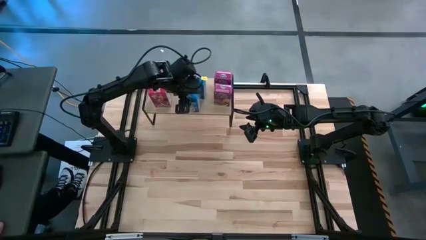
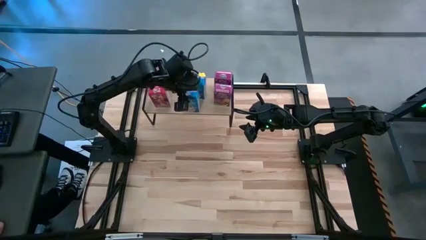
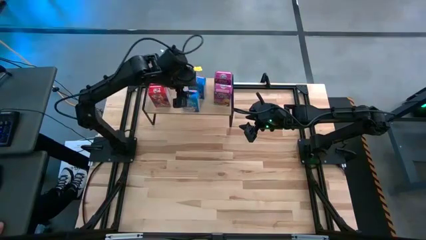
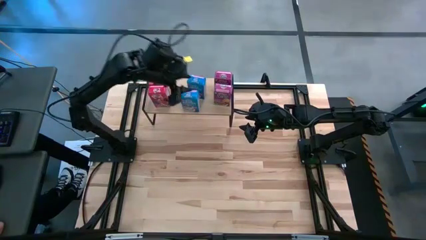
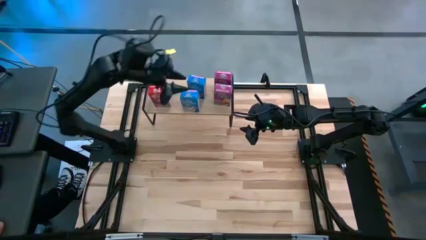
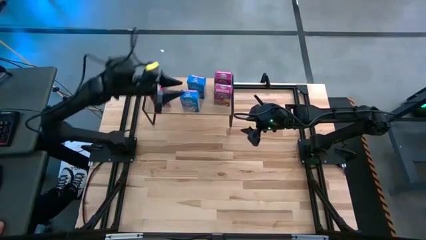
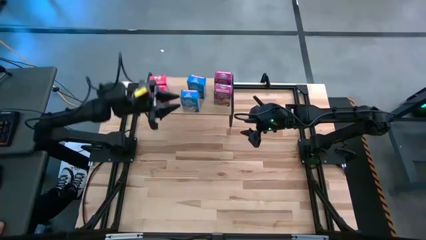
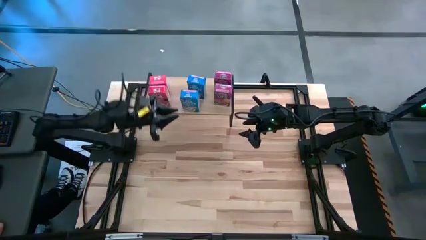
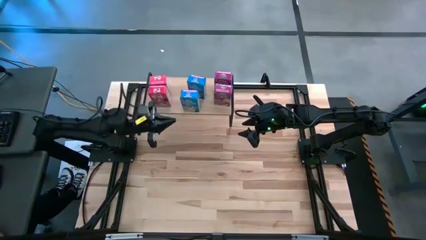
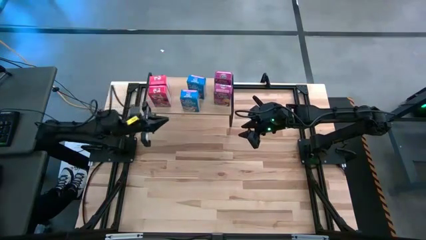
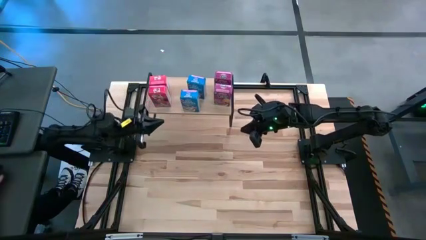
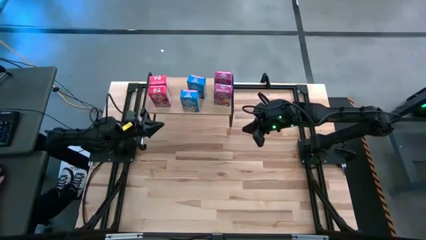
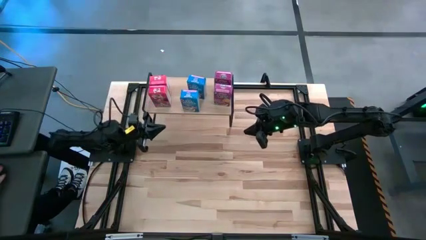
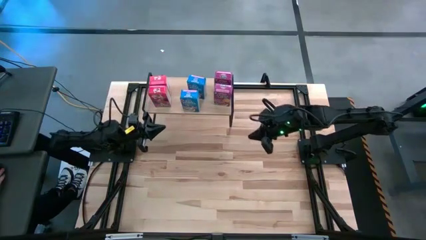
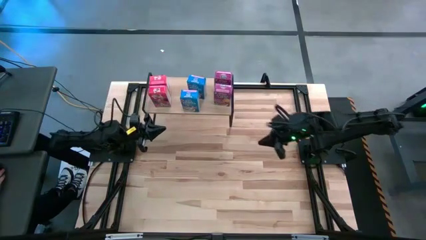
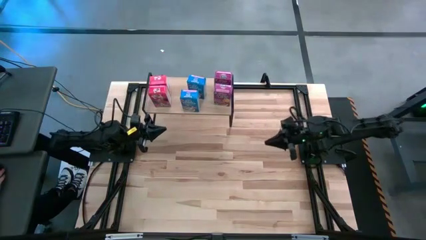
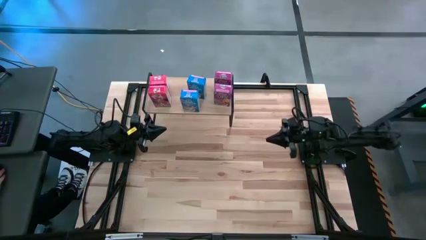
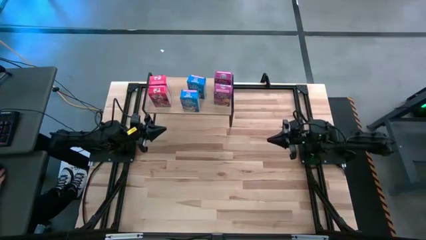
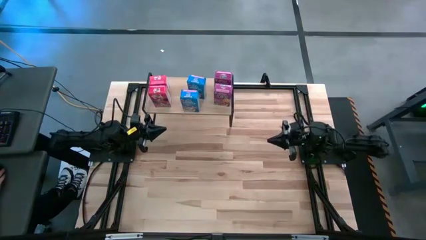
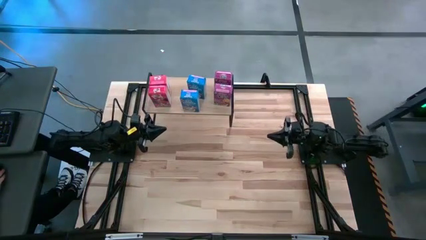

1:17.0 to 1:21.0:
Task: Stack cereal on shelf
Return to Home Position

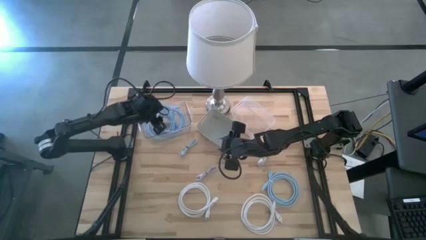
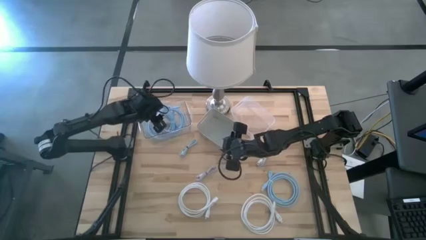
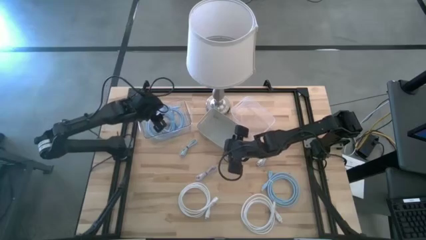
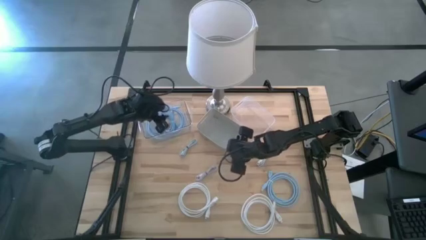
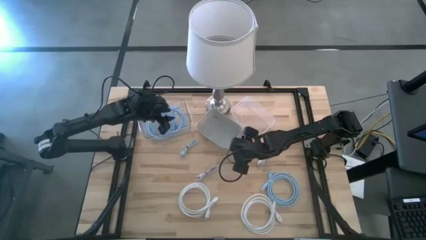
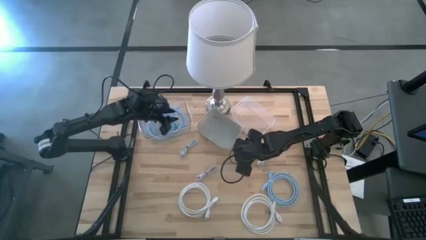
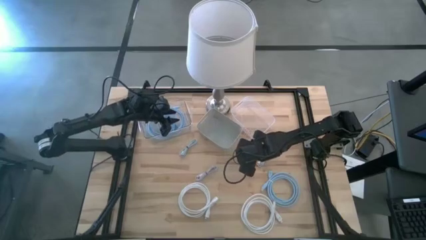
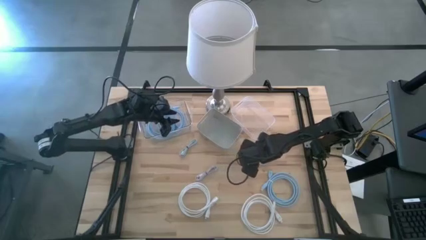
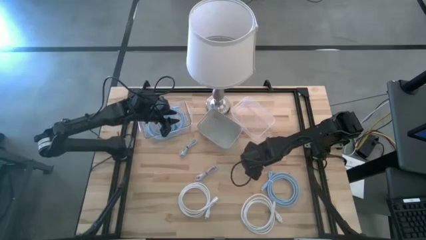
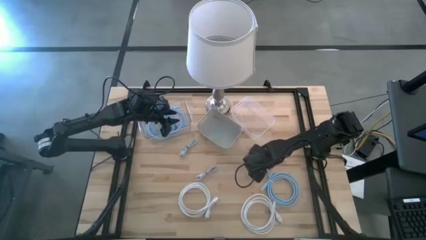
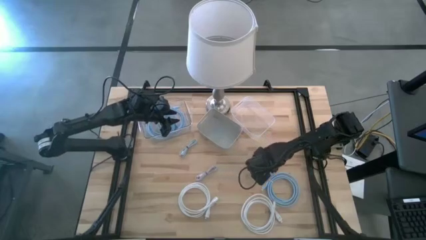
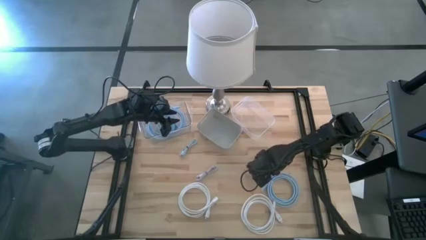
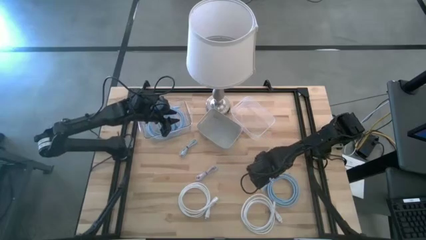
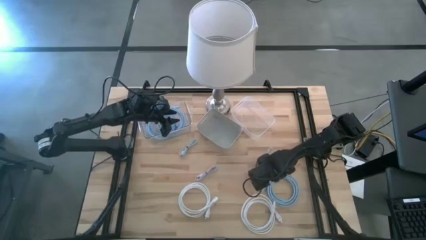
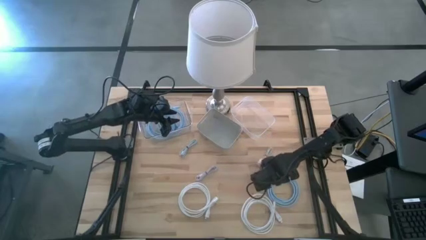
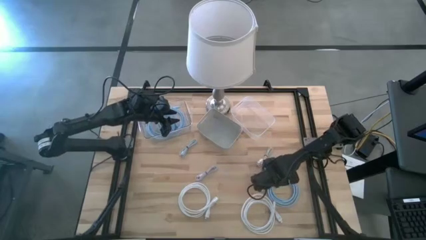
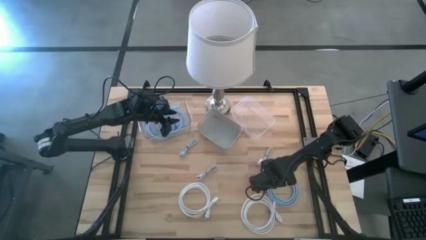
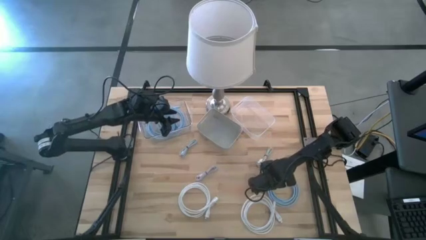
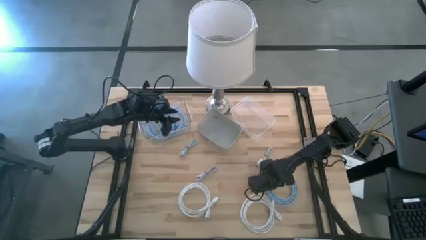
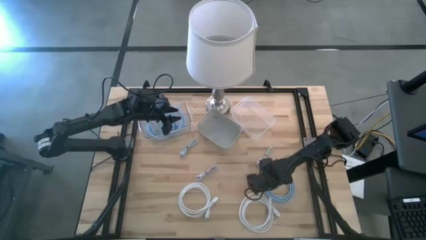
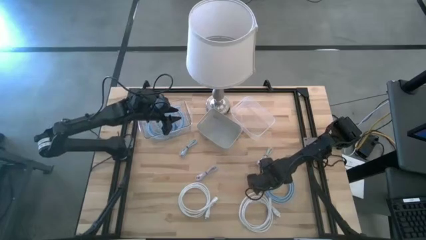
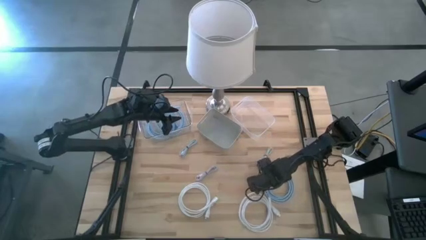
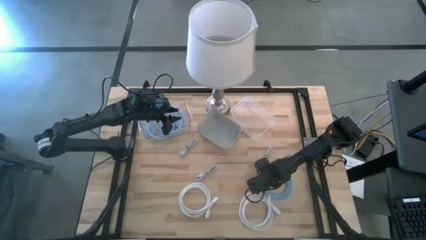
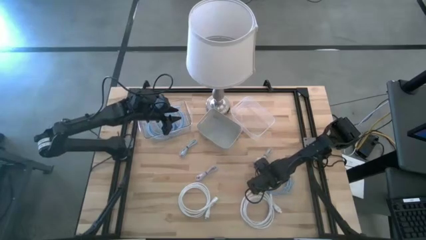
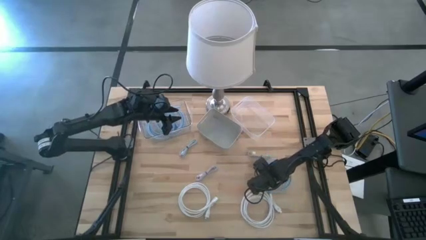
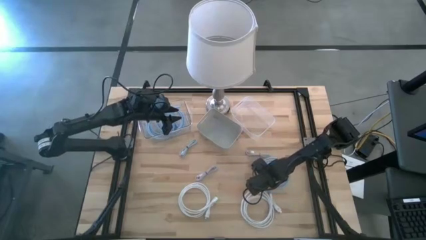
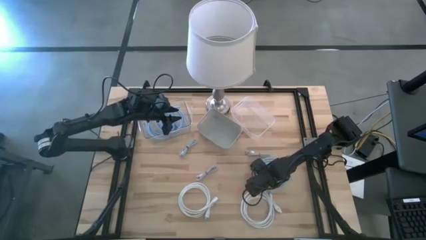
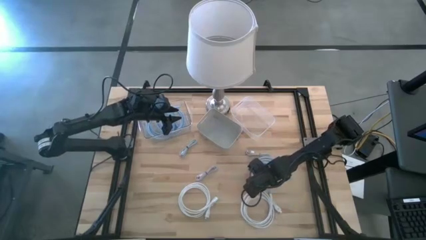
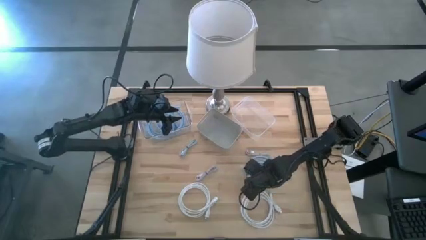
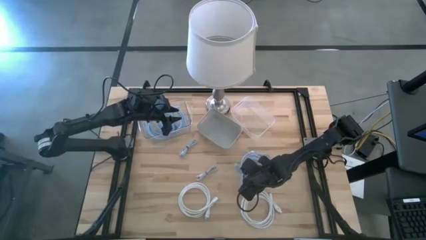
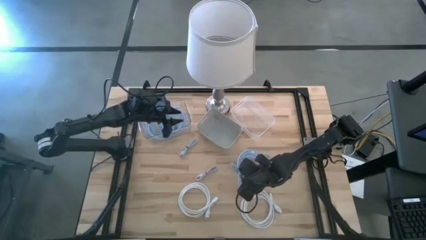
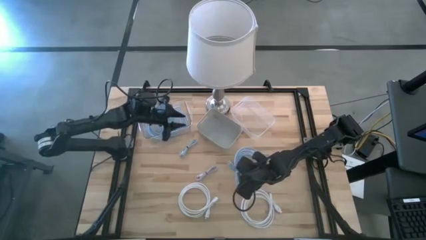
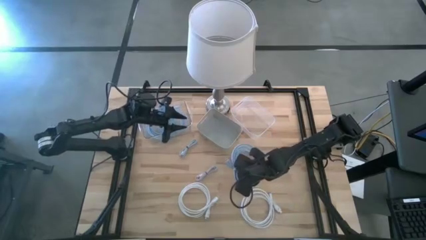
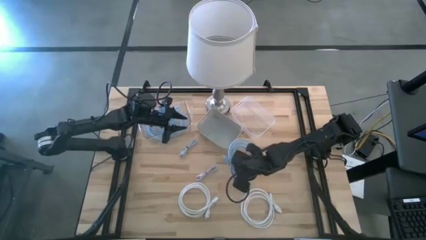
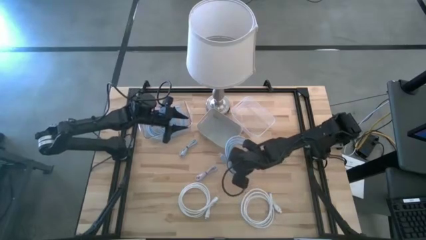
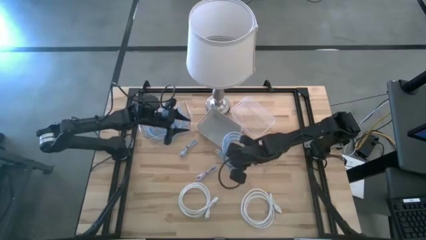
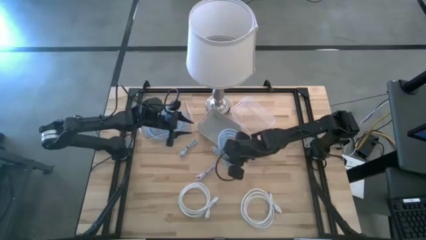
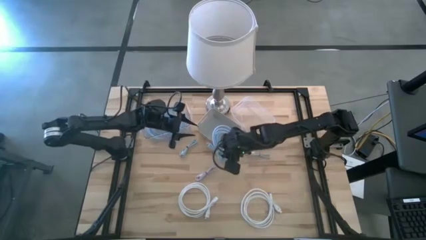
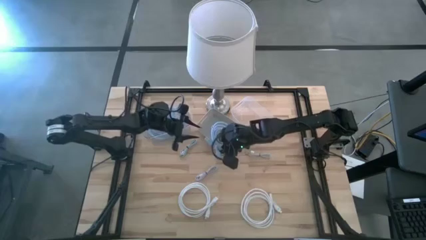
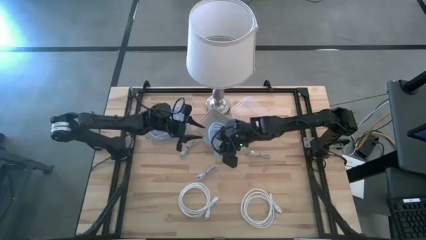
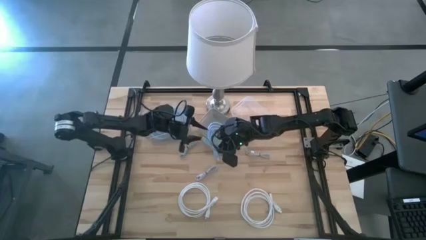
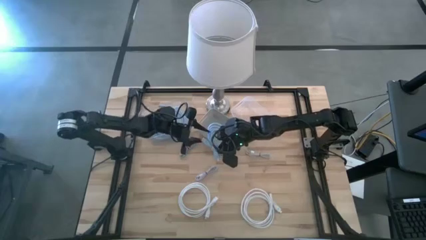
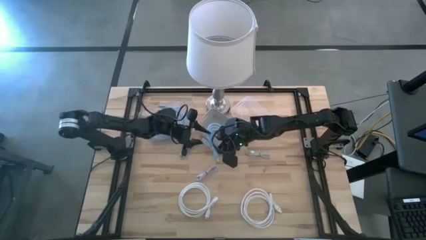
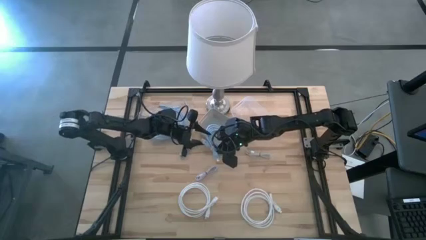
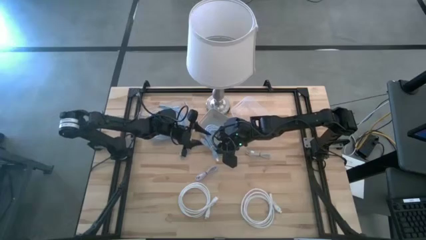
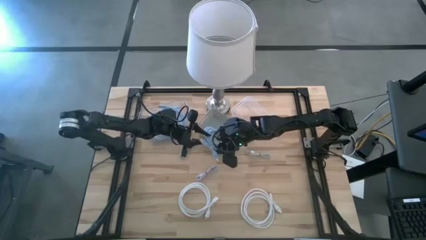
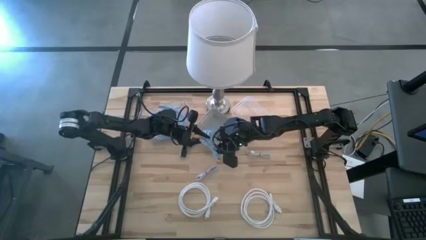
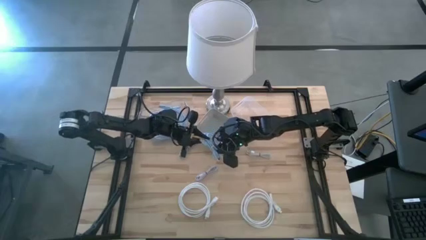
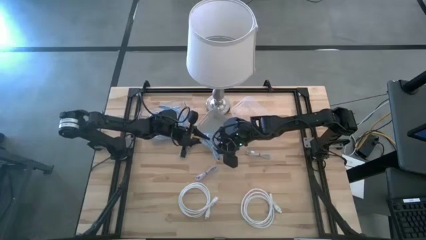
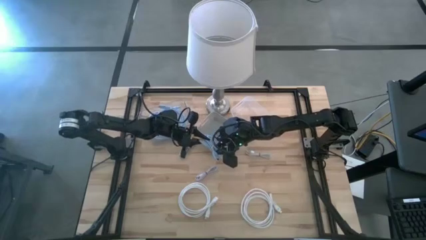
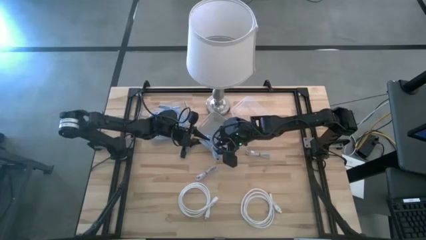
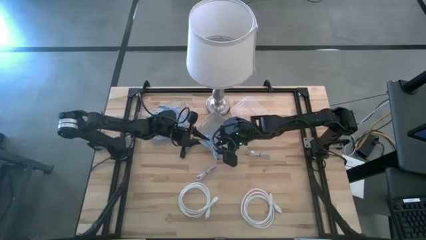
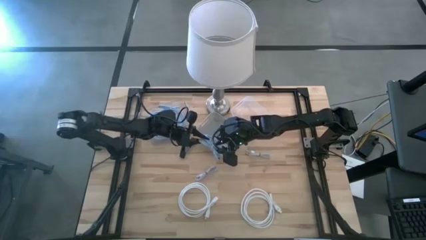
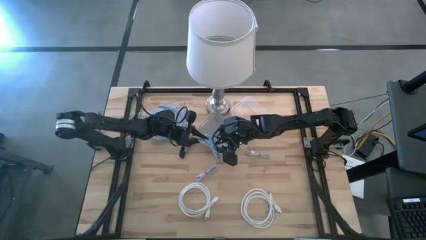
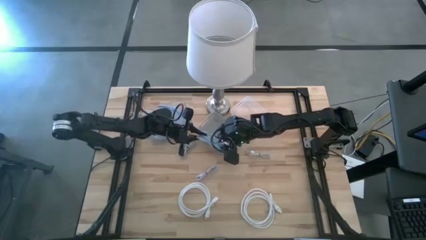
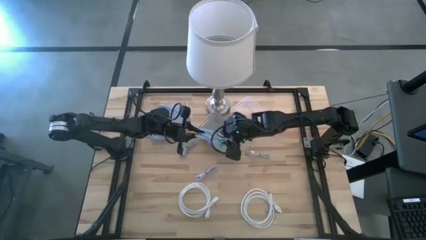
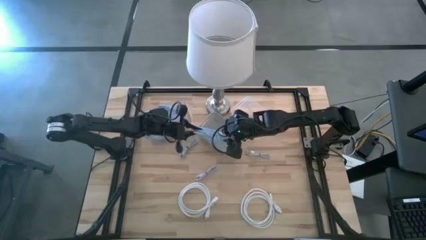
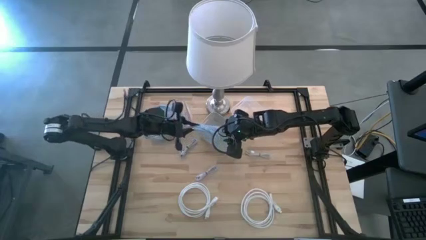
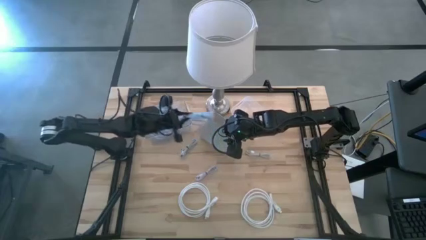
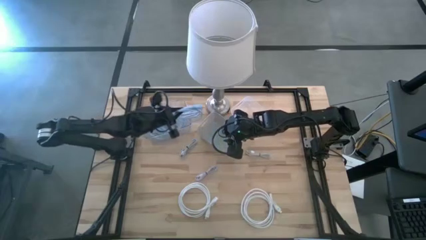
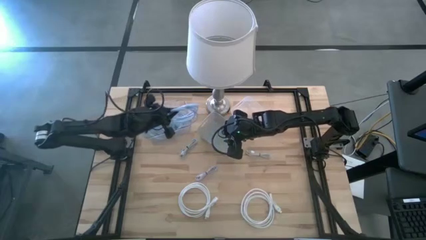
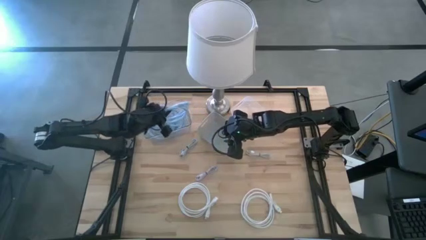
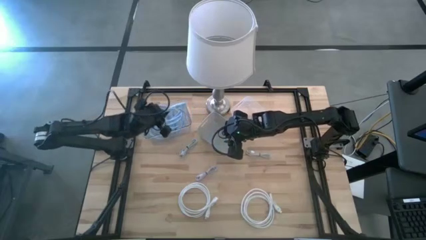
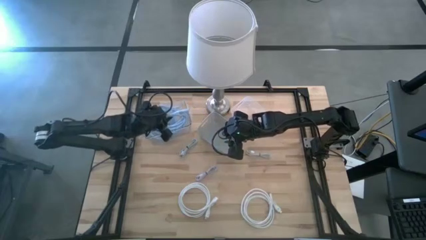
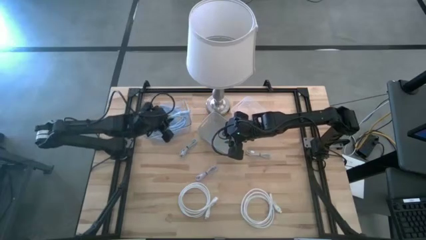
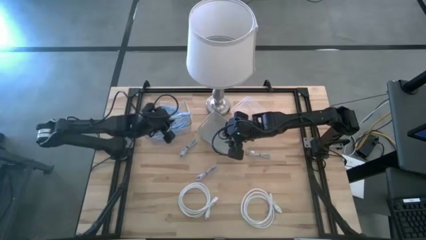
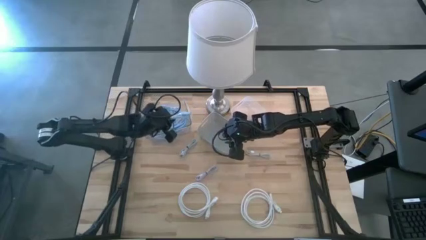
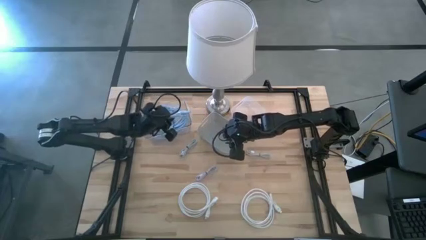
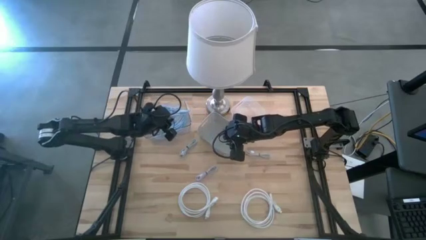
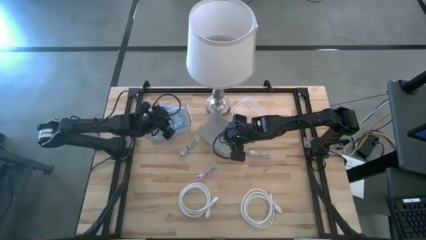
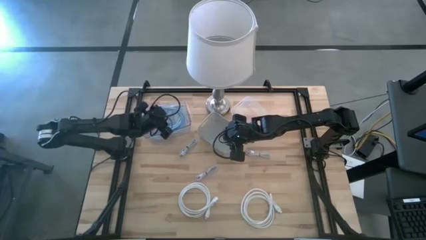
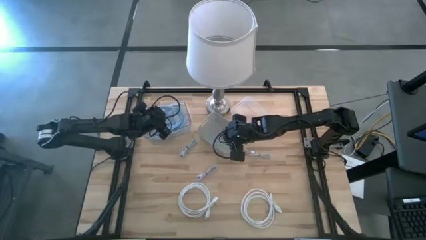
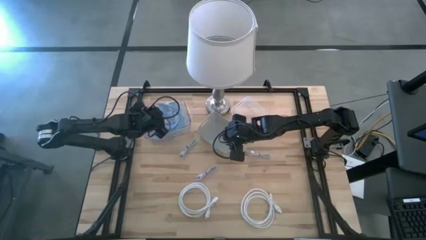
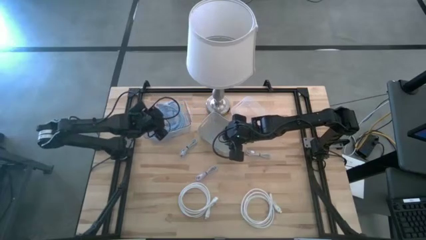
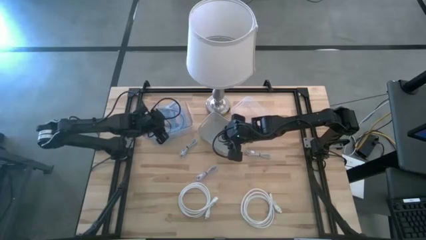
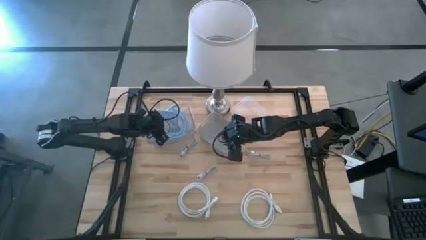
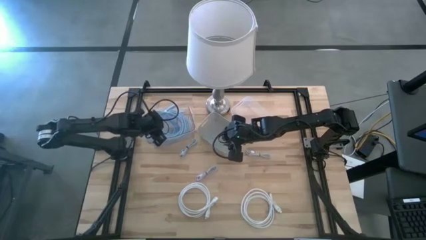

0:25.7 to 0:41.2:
Task: Pick & Place USB Port
Put the blue HDMI cable into the left transparent bin
